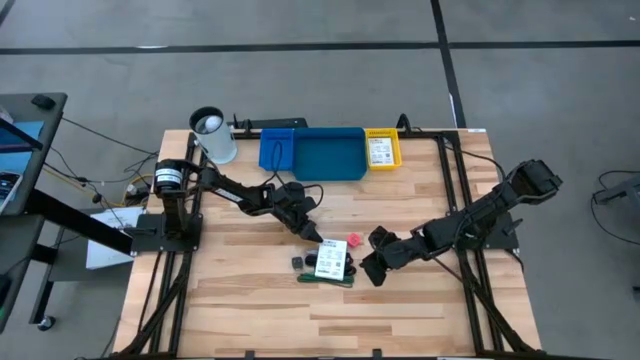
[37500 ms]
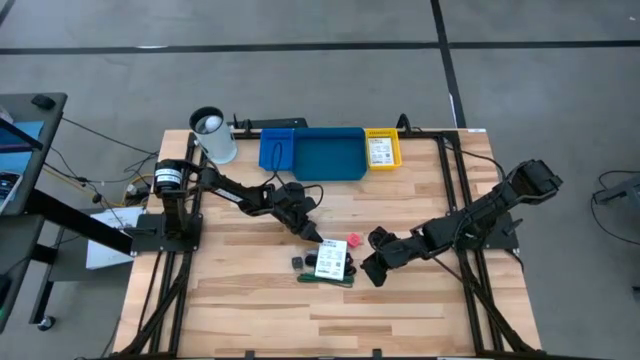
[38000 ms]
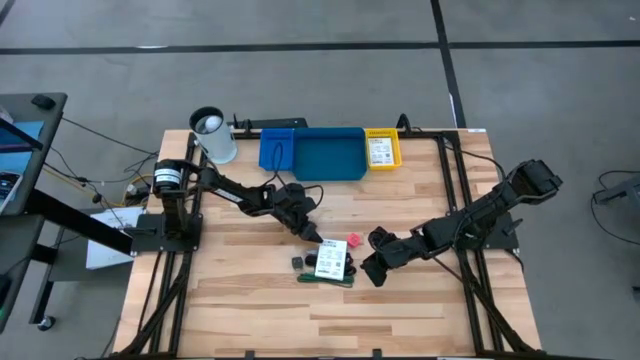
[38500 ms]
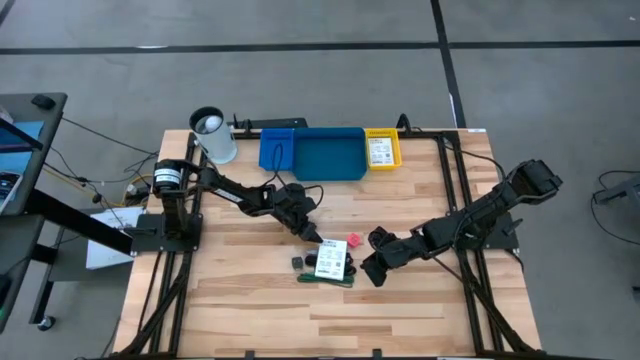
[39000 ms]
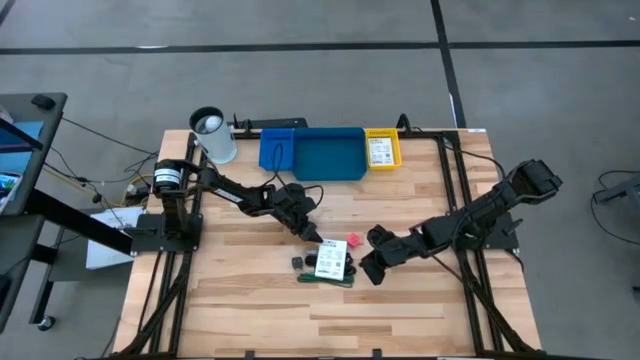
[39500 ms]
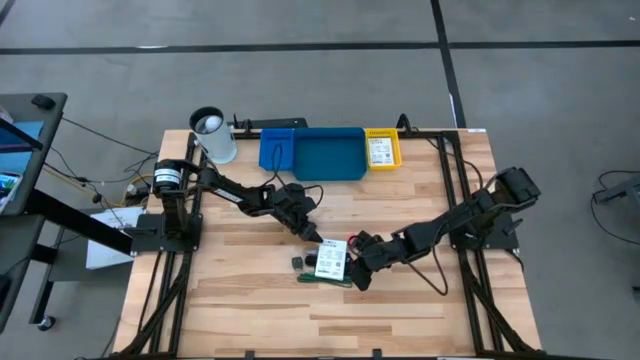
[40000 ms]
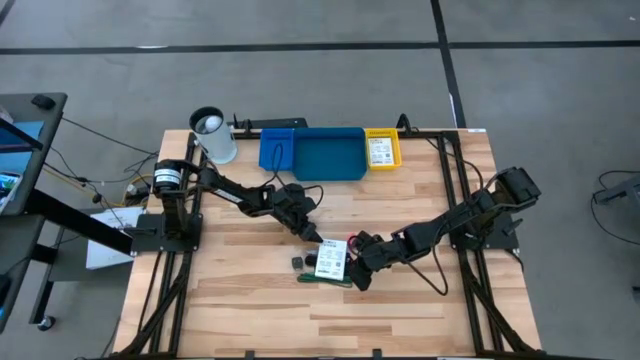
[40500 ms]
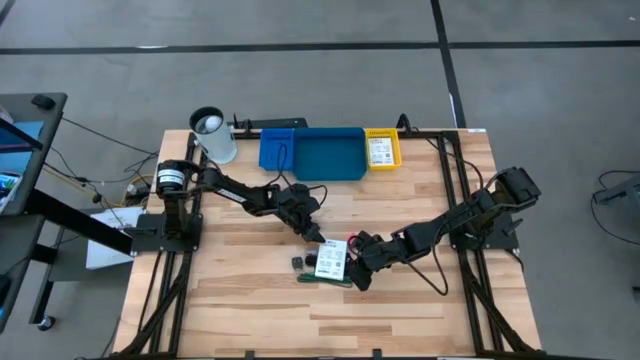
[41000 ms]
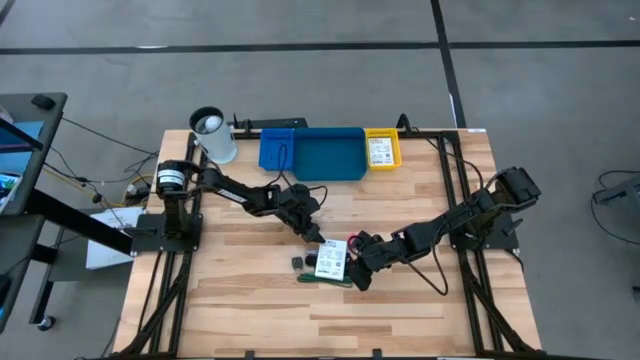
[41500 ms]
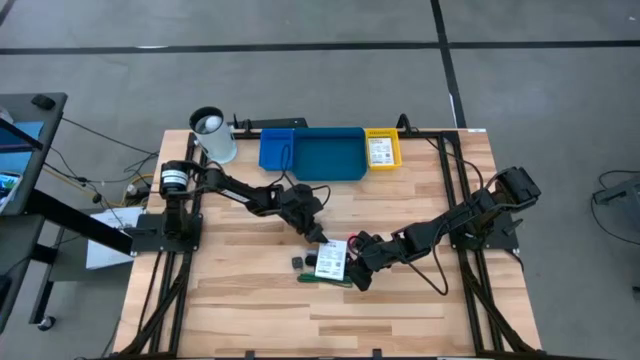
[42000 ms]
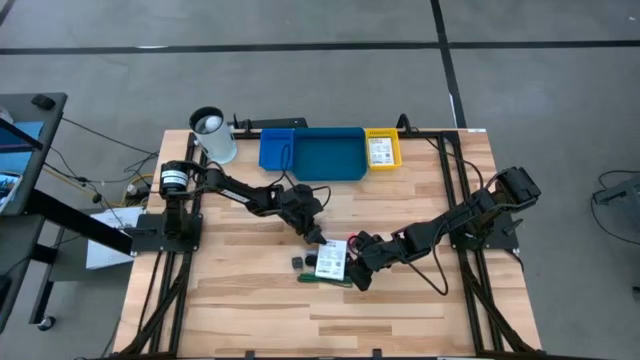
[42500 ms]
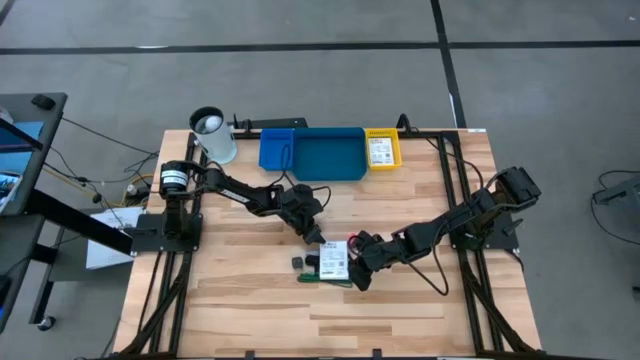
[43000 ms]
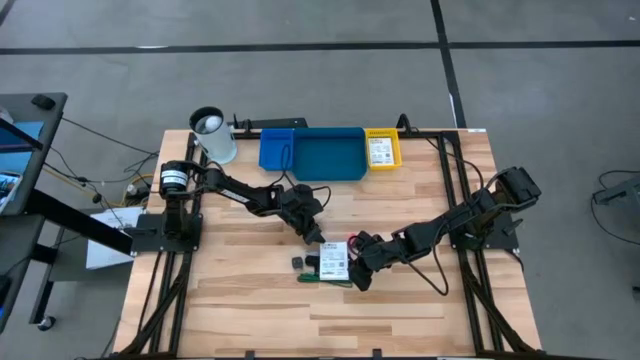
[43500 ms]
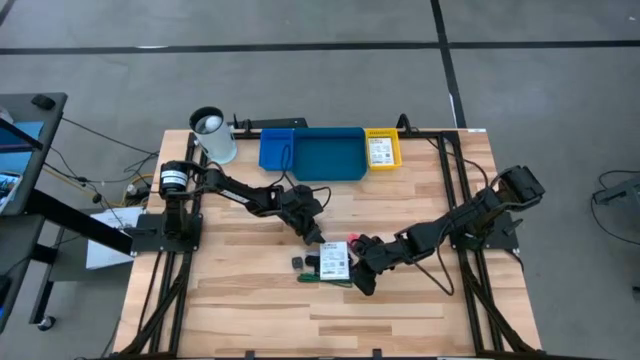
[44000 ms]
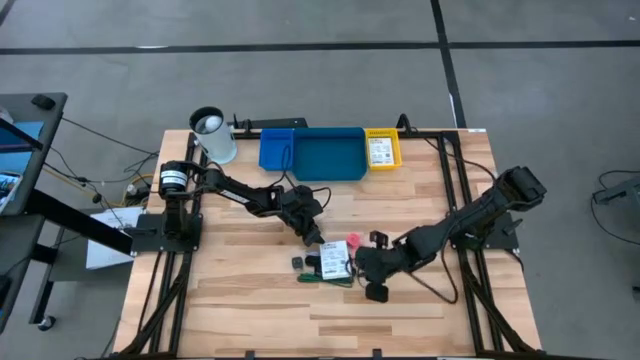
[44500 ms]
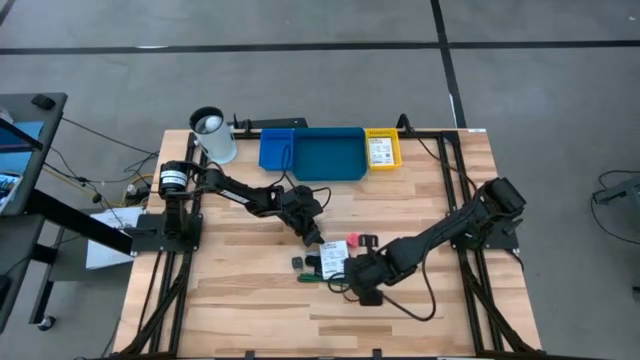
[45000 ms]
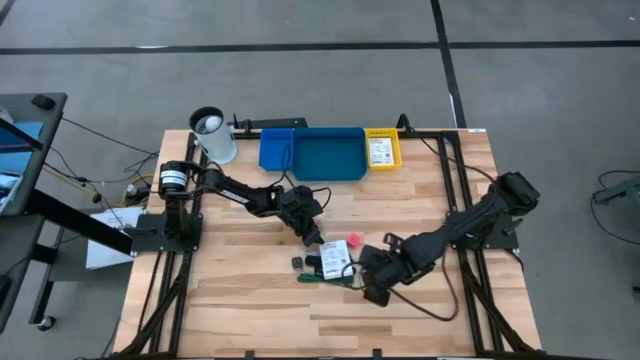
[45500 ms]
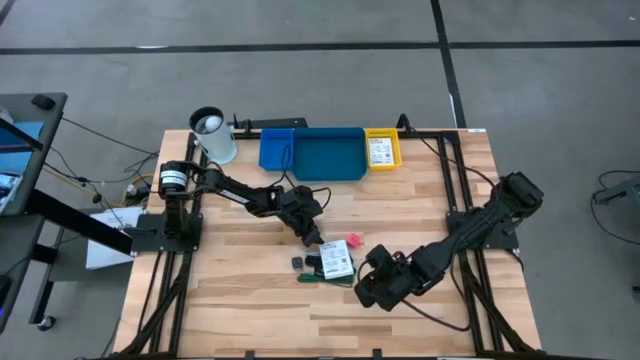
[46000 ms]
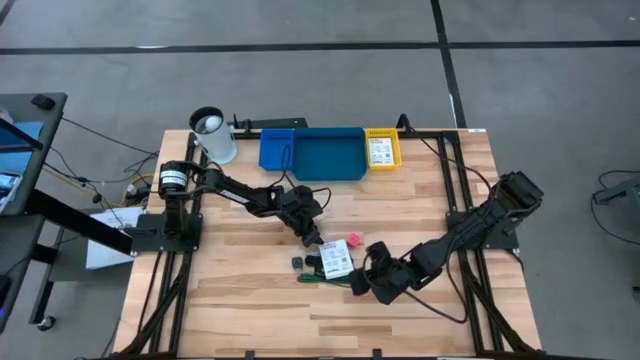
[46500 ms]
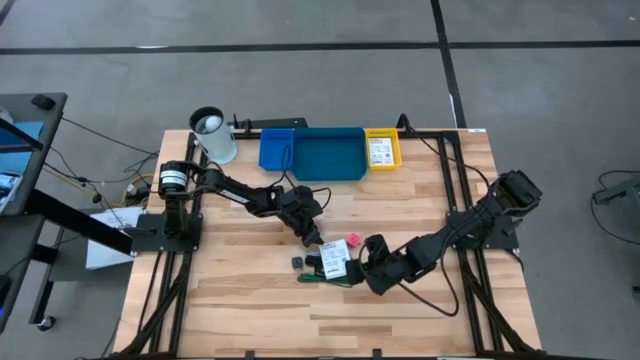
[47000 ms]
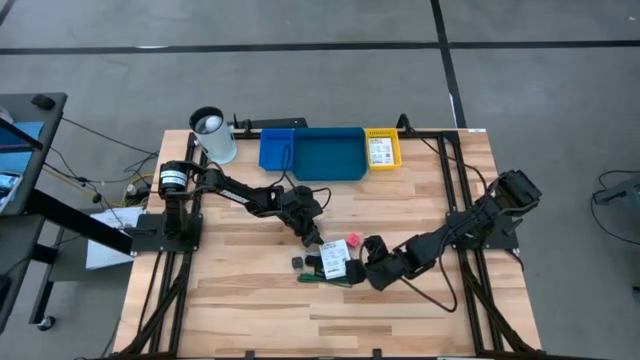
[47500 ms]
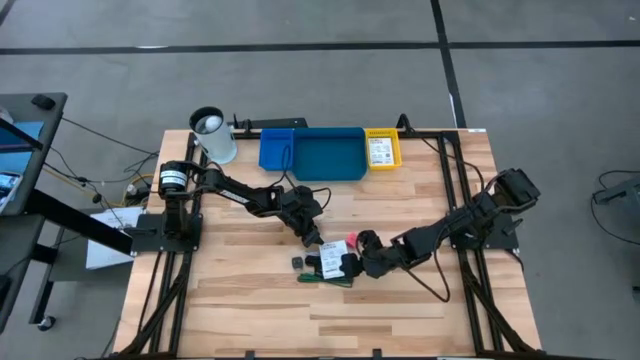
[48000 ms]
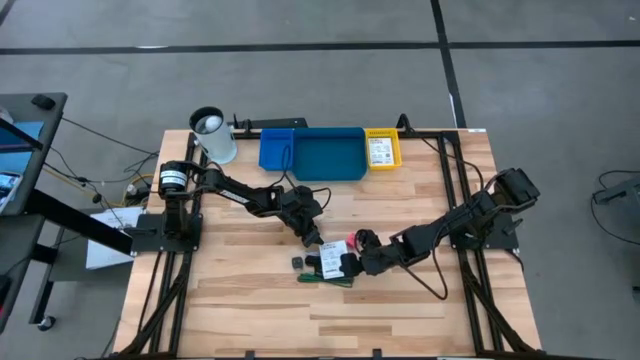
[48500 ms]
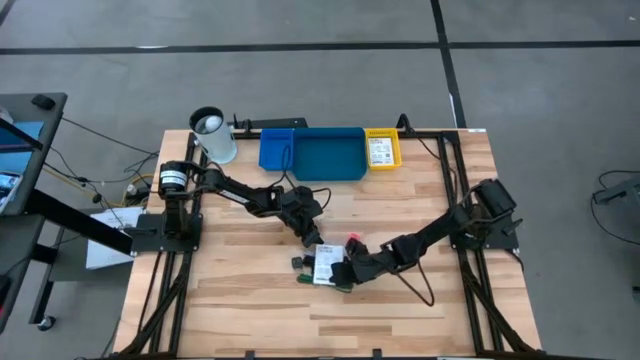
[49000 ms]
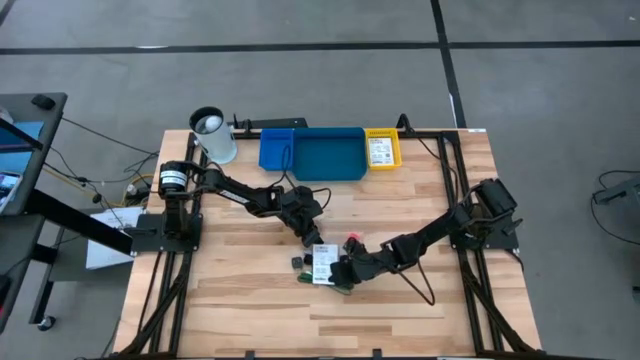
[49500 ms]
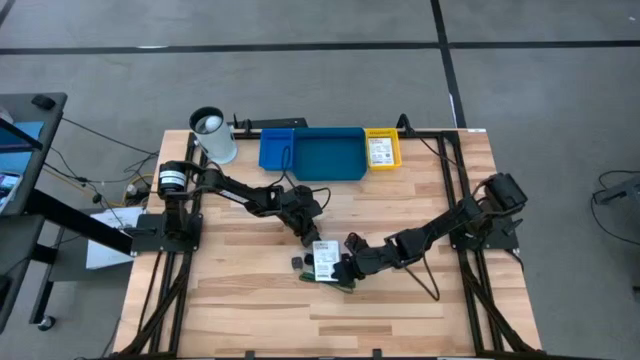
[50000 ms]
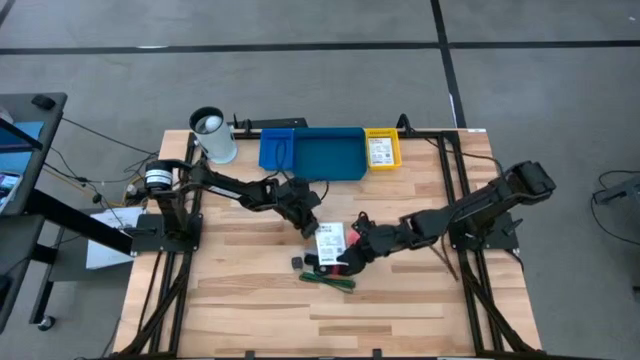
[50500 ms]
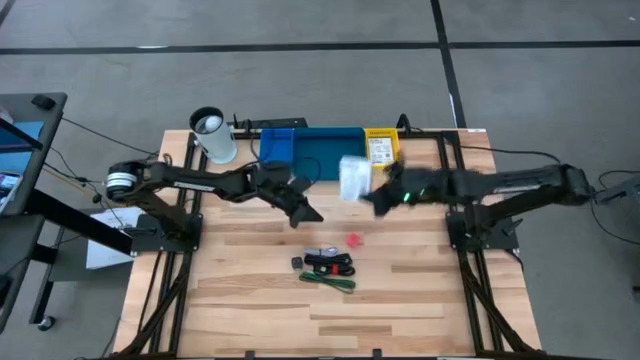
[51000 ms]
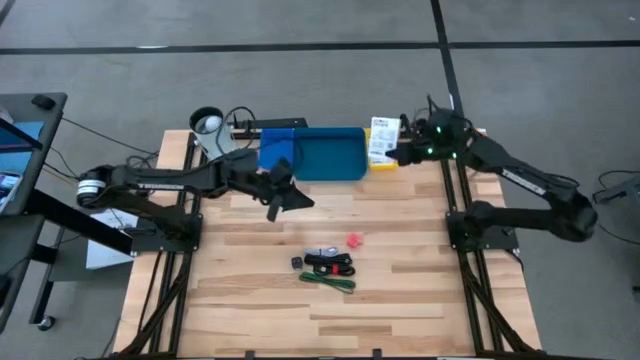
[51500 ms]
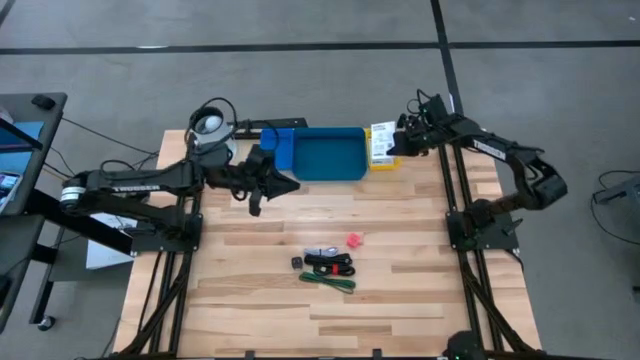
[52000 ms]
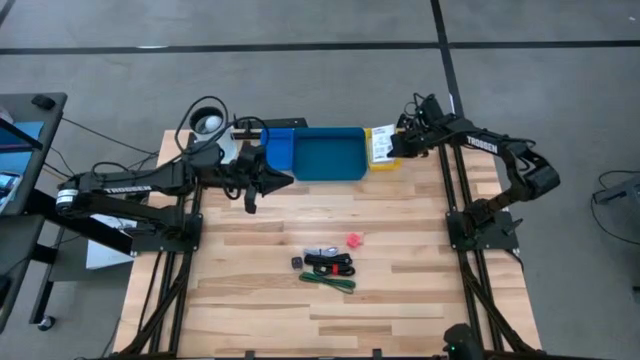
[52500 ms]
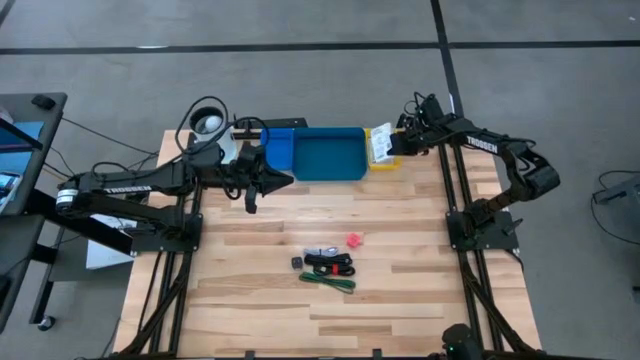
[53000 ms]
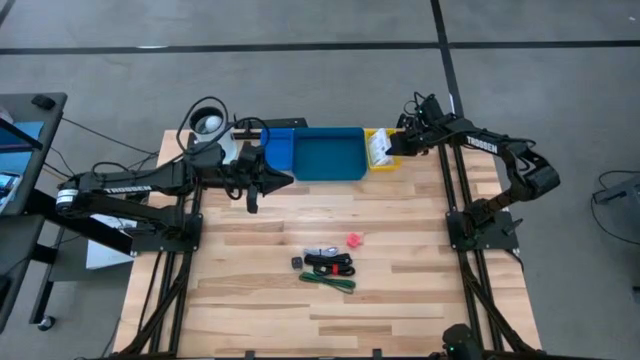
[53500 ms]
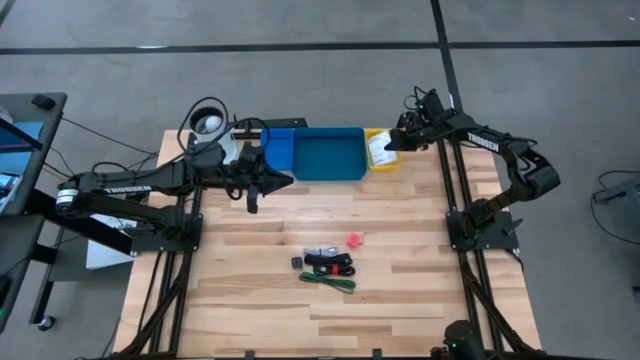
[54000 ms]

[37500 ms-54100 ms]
Task: Pick and place items into bin
Put the white card reader box into the yellow bin

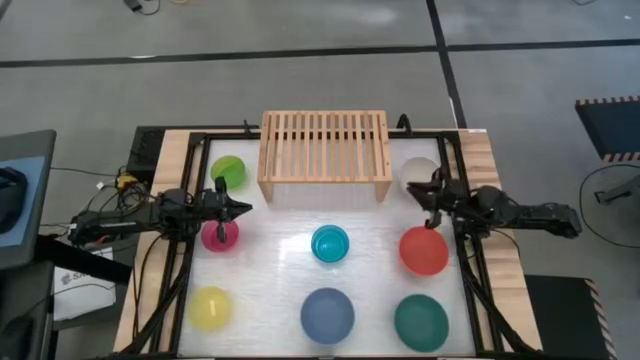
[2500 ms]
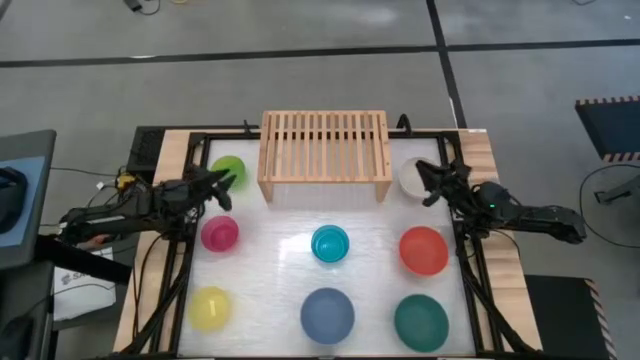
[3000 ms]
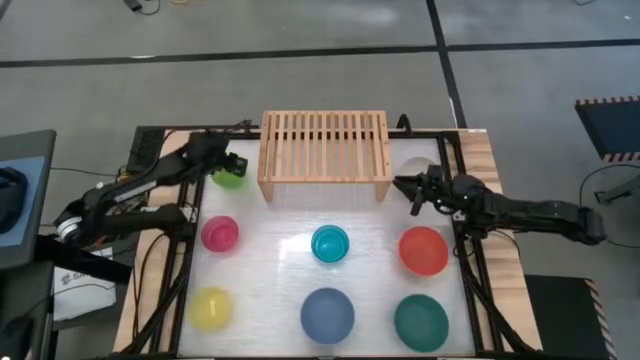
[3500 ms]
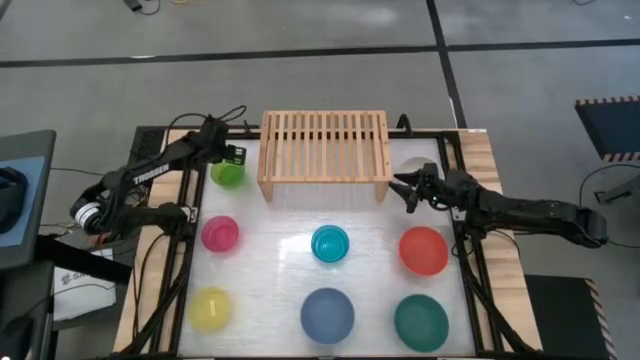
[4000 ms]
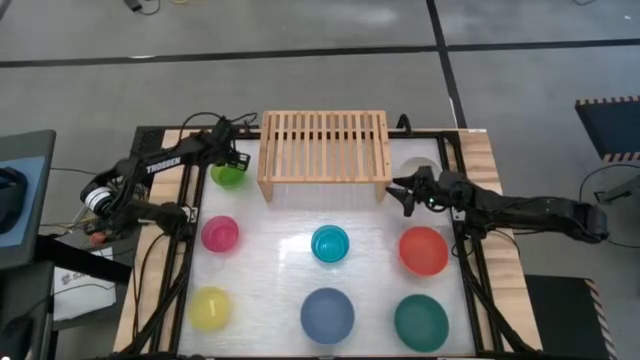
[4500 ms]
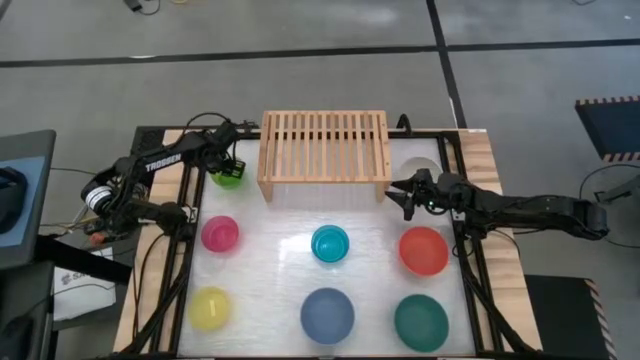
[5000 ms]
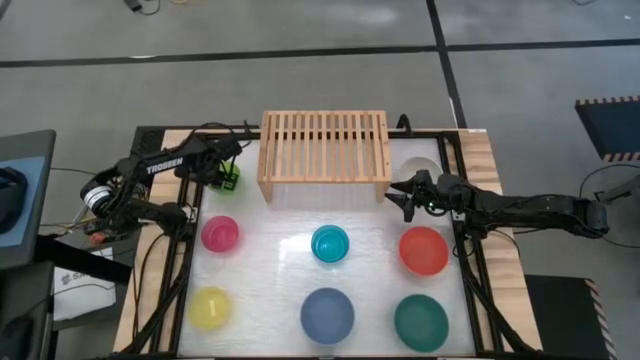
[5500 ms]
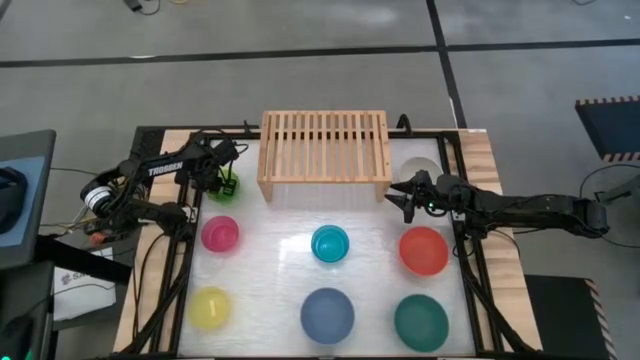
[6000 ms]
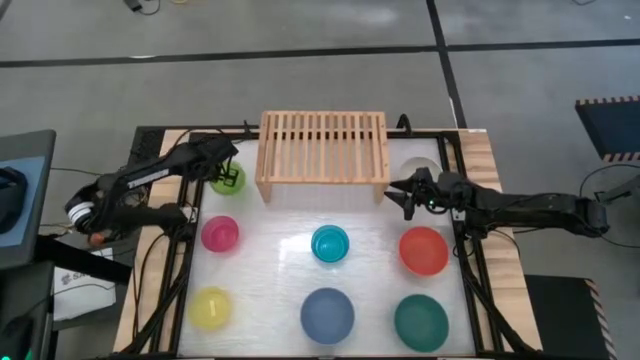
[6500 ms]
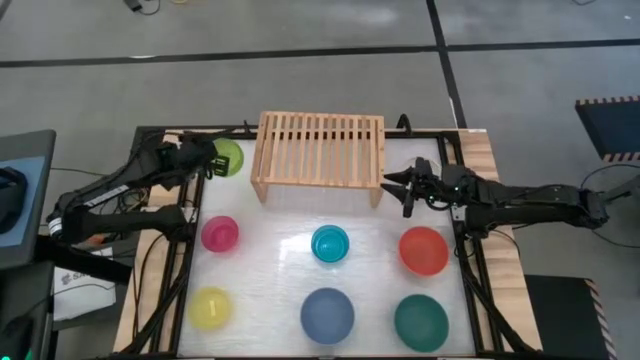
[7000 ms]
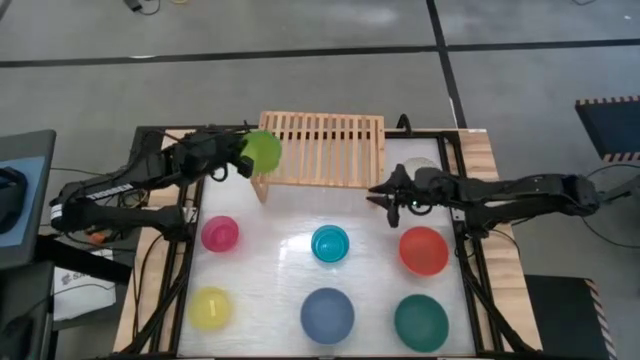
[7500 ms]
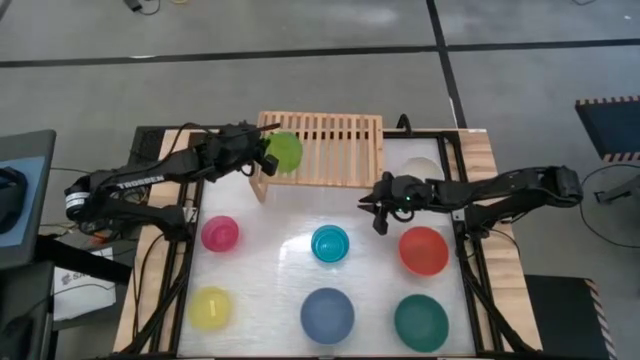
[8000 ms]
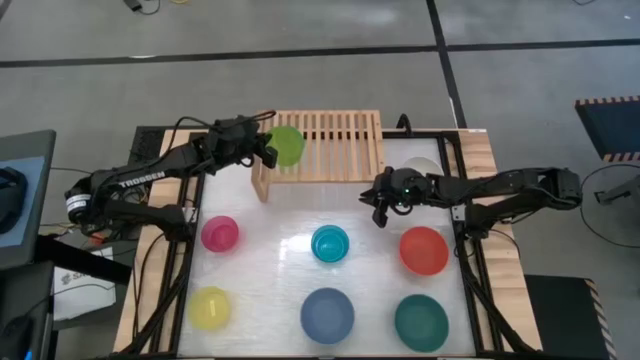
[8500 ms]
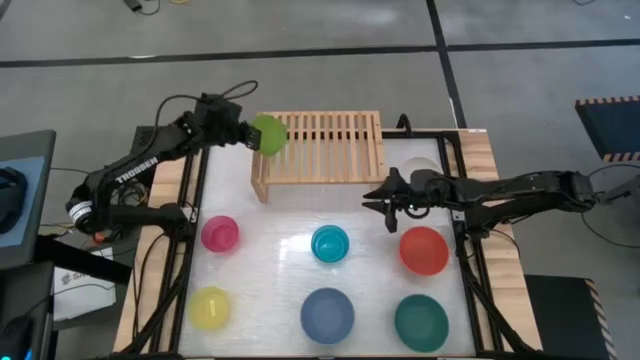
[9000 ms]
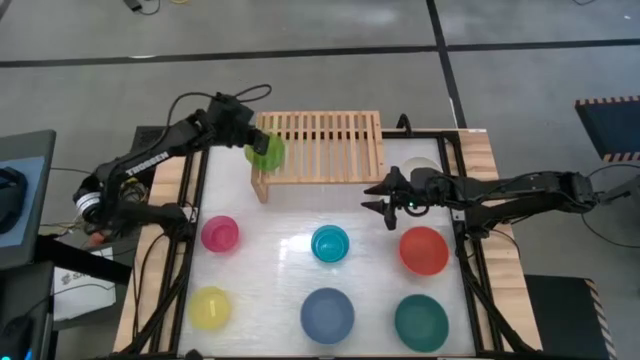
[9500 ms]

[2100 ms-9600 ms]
Task: Place and stack bowls onto a shelf
Put the transparent green bowl on the shelf
